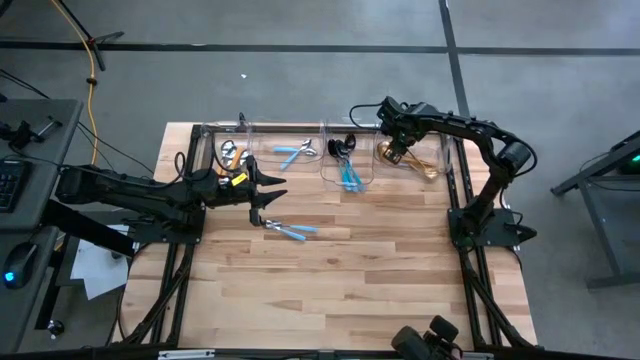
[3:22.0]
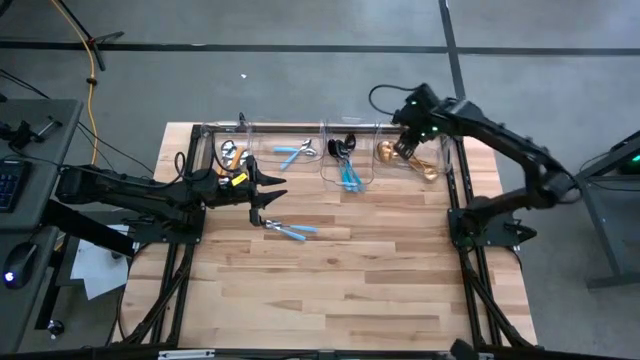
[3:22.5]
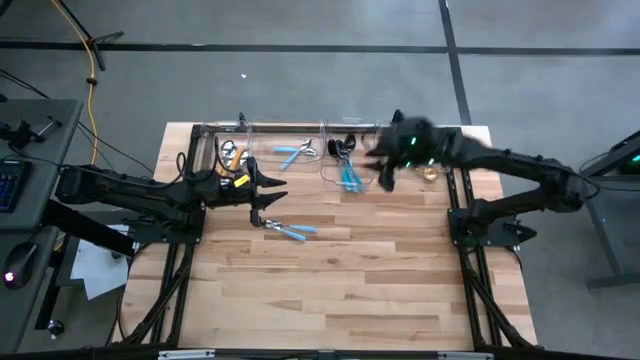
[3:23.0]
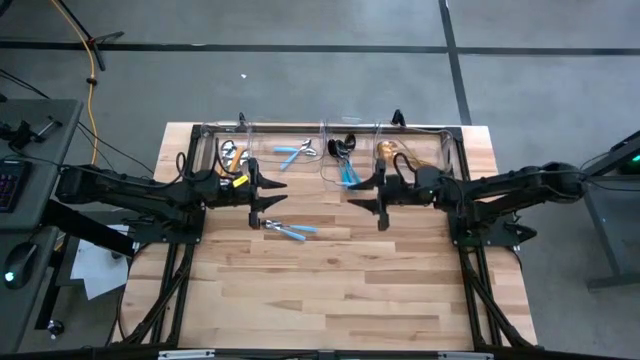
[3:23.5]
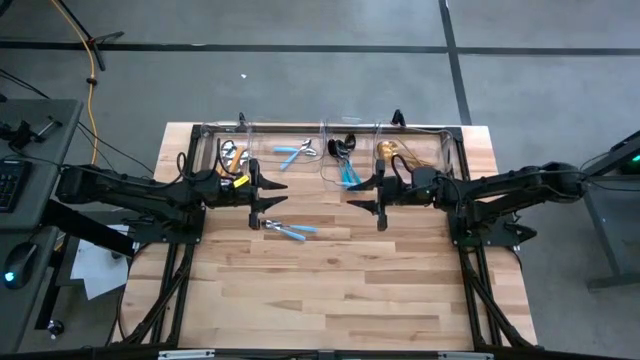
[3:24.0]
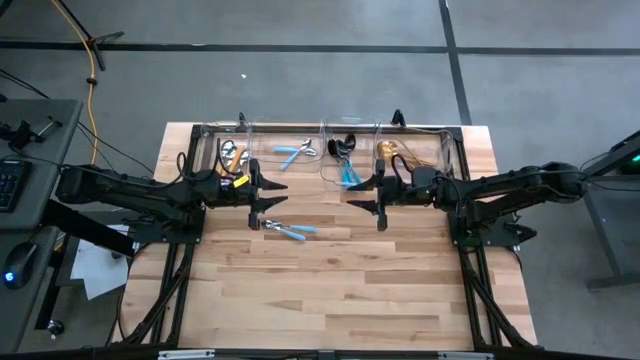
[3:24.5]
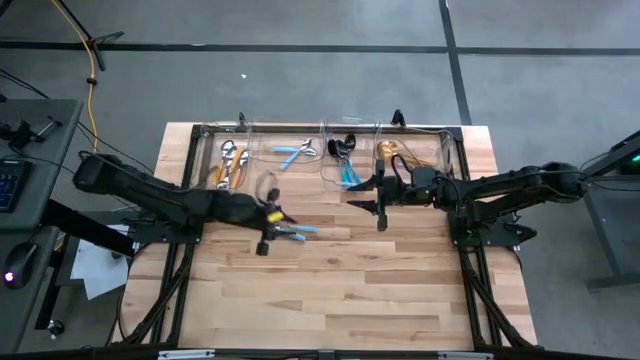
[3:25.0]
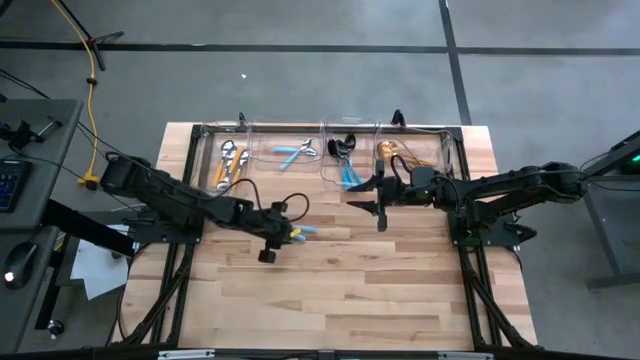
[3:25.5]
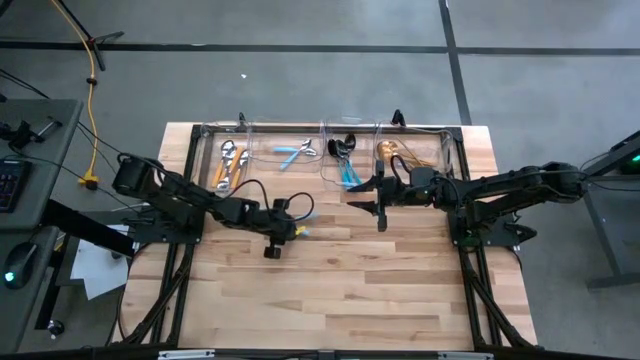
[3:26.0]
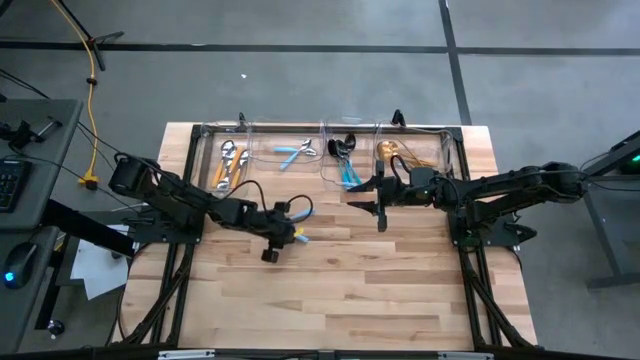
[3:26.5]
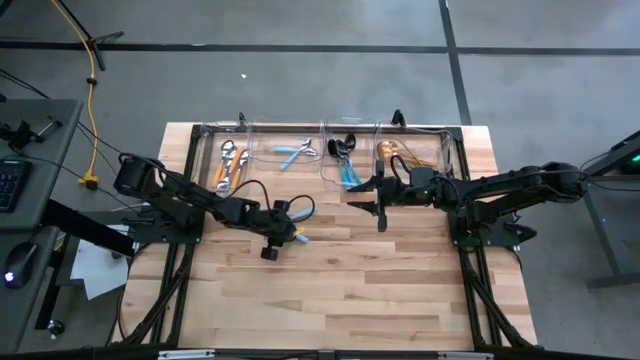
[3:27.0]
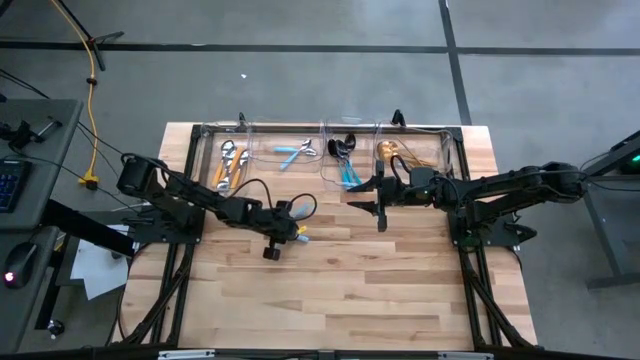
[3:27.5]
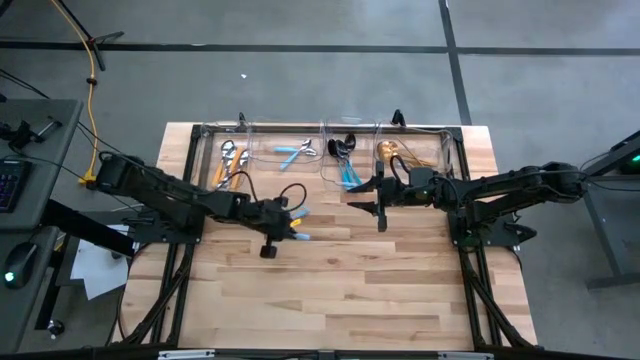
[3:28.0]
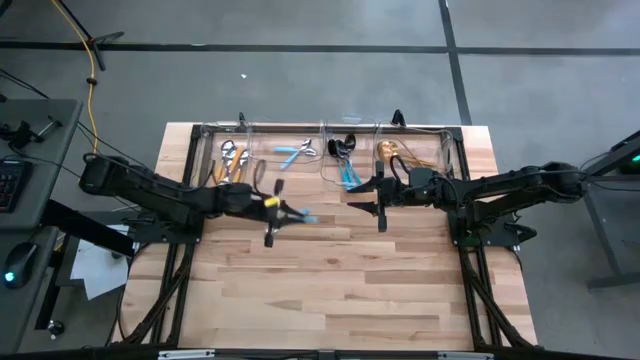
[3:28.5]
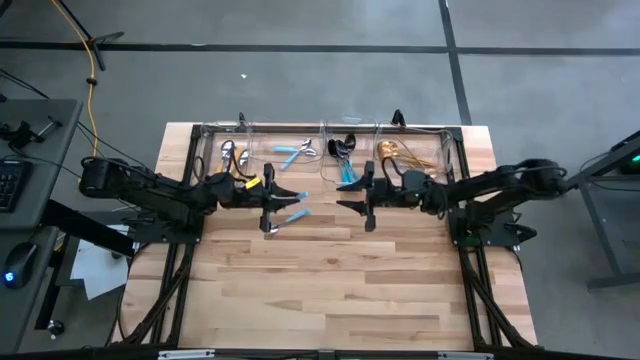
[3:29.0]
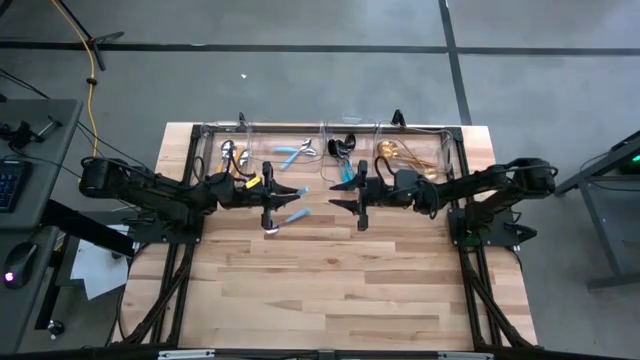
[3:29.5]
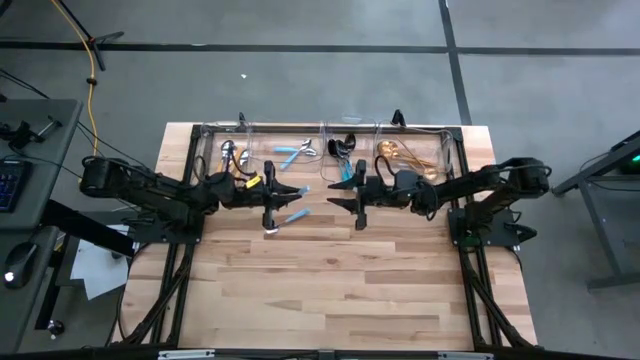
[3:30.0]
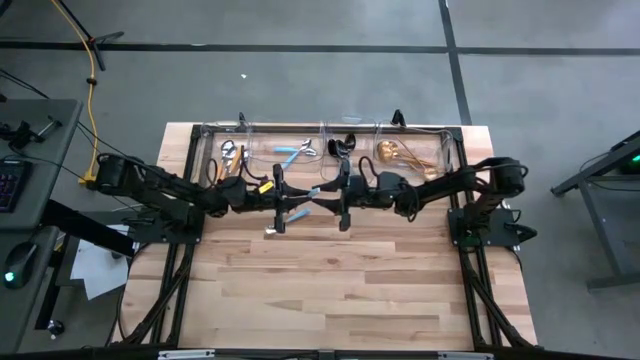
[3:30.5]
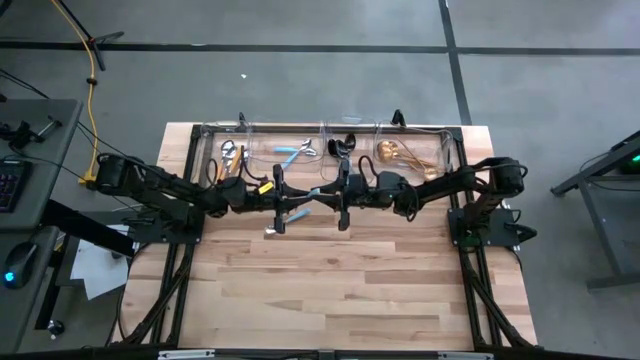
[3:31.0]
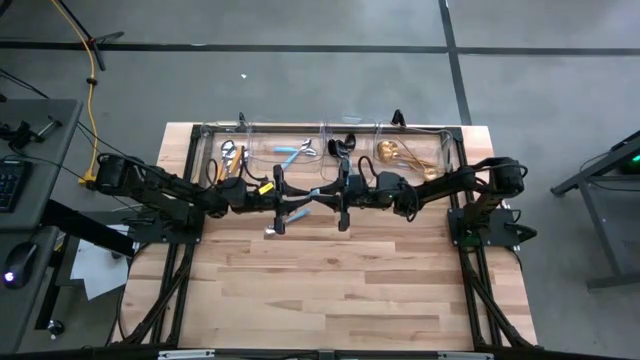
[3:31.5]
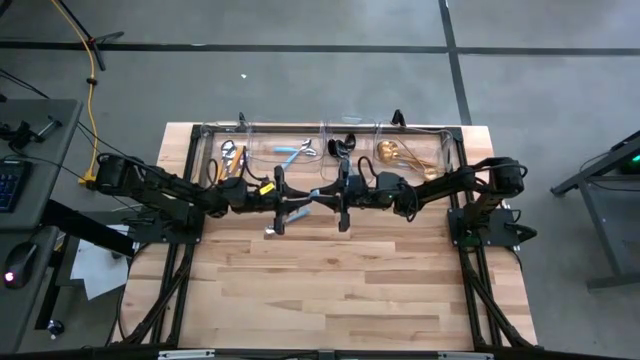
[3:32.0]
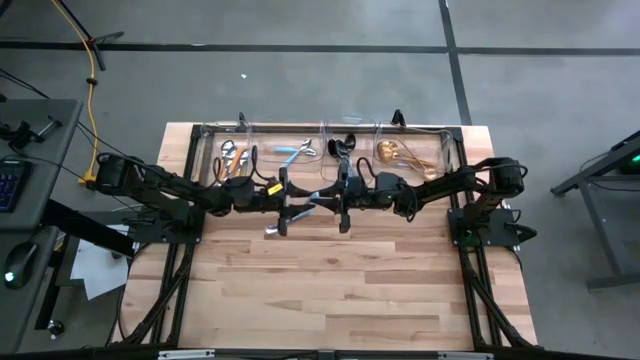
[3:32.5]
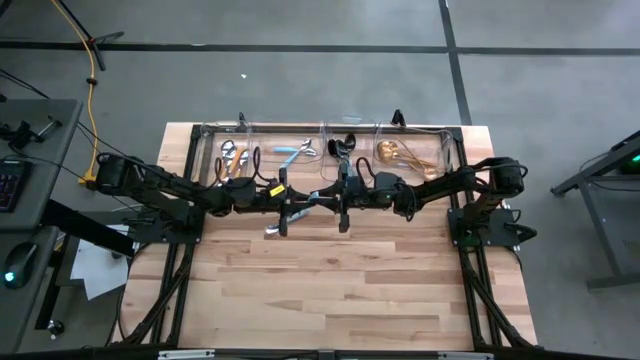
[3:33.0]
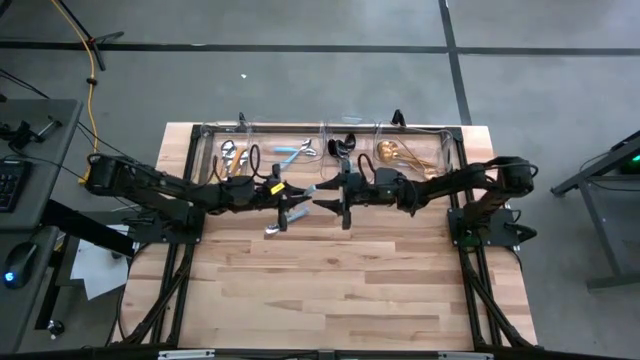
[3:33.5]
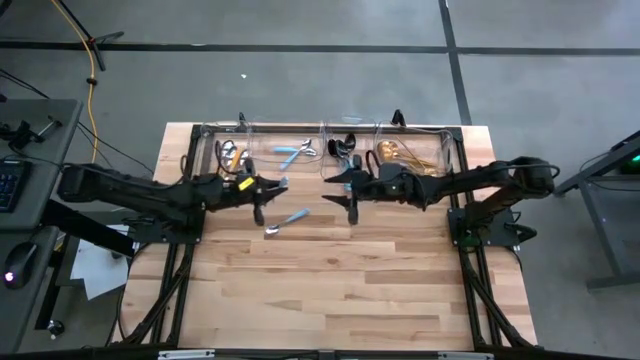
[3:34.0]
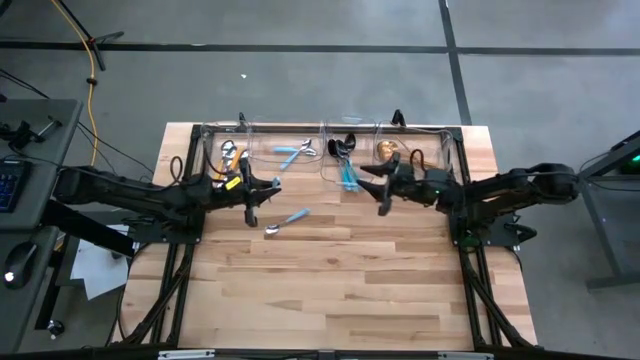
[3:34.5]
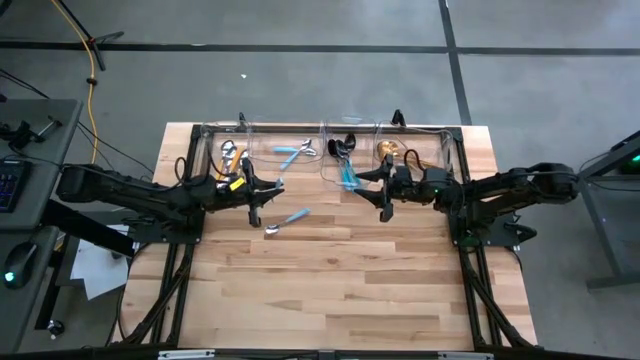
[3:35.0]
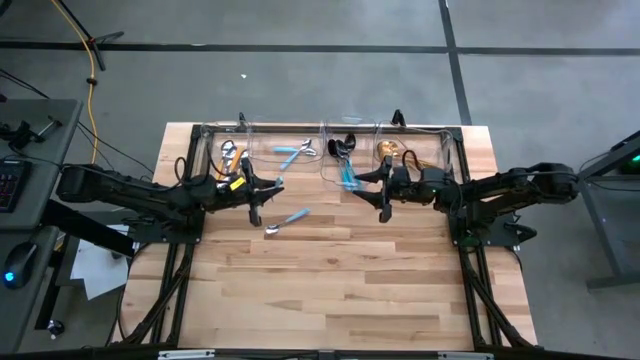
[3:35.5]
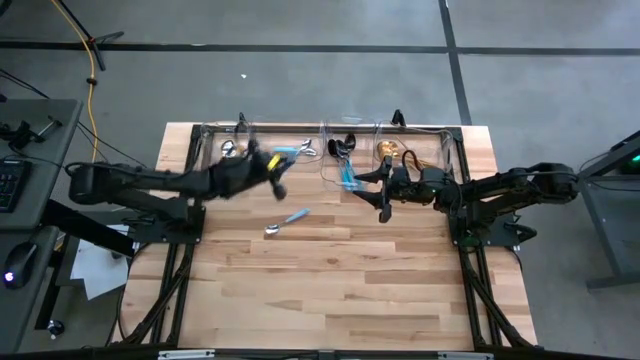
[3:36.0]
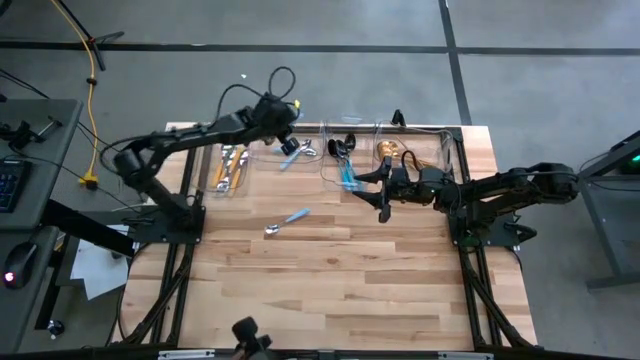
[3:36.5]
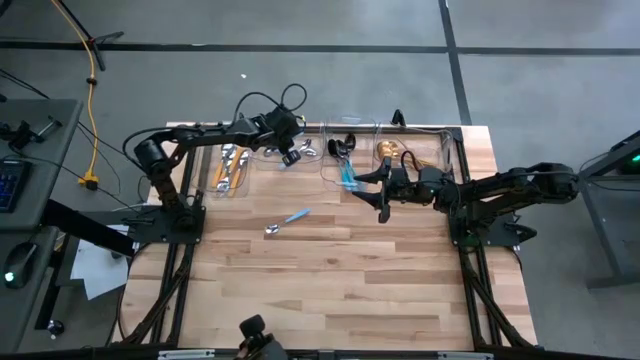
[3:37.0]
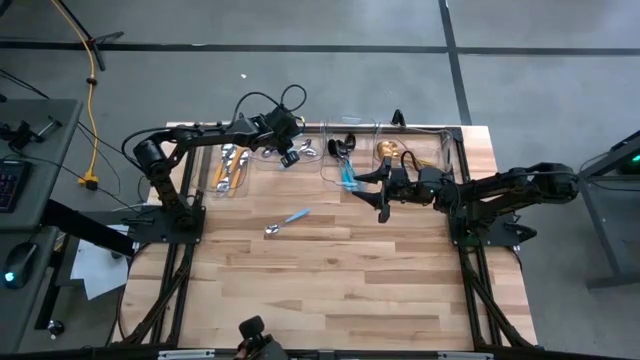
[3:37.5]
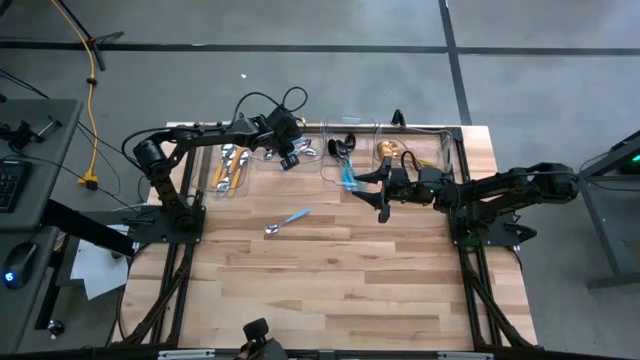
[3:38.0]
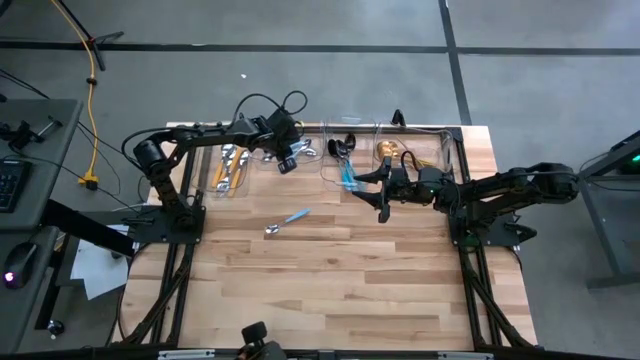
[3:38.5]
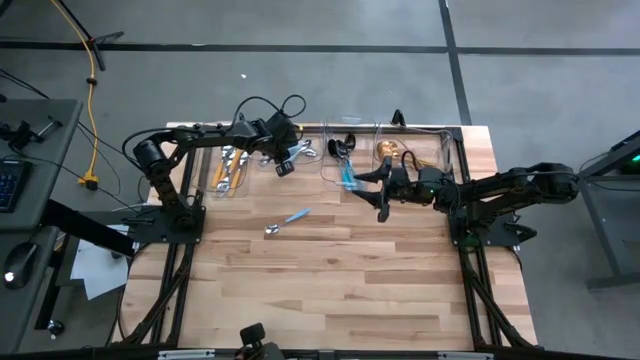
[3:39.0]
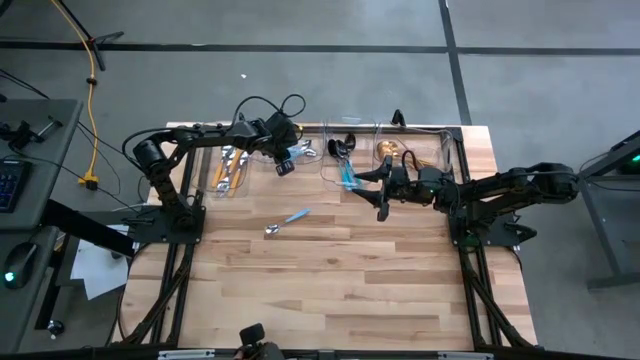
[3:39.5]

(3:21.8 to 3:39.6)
Task: Sort silverware by color (type)
Put the blue spoon into the left transparent bin

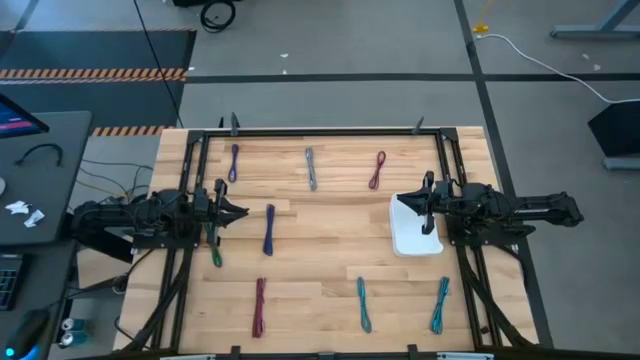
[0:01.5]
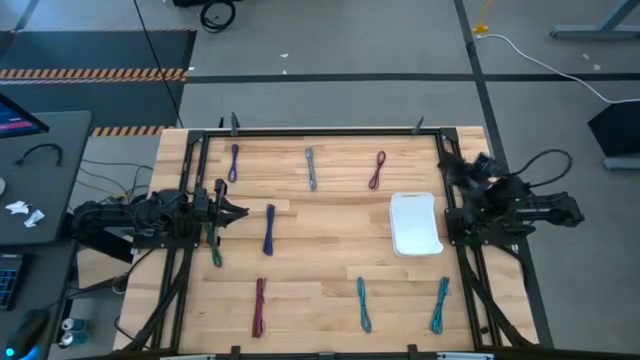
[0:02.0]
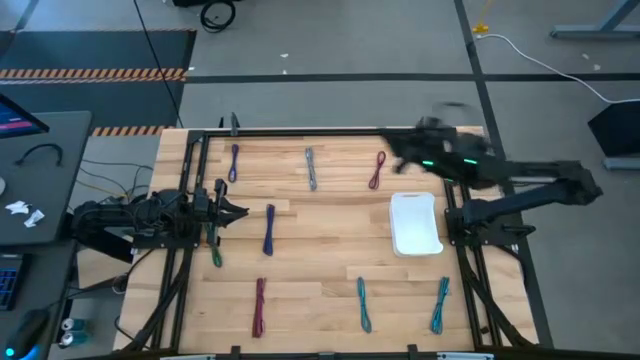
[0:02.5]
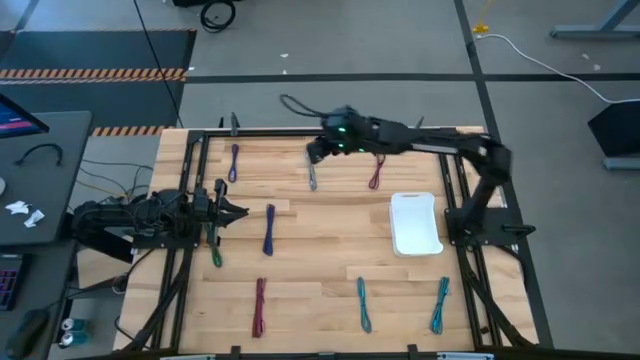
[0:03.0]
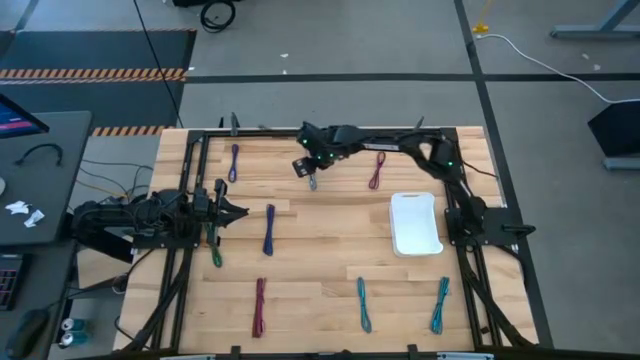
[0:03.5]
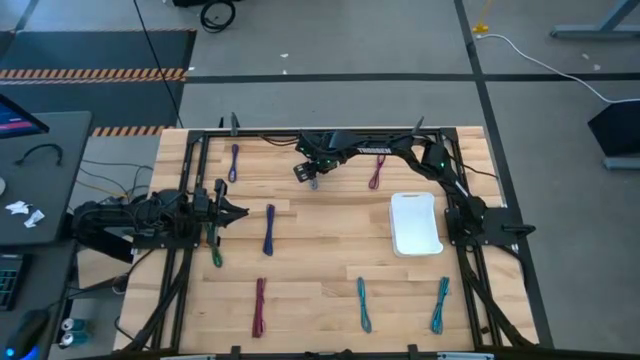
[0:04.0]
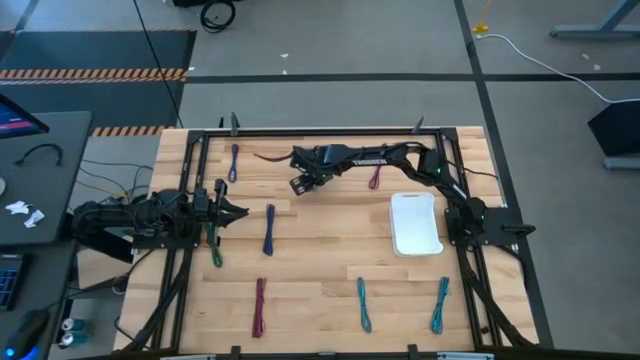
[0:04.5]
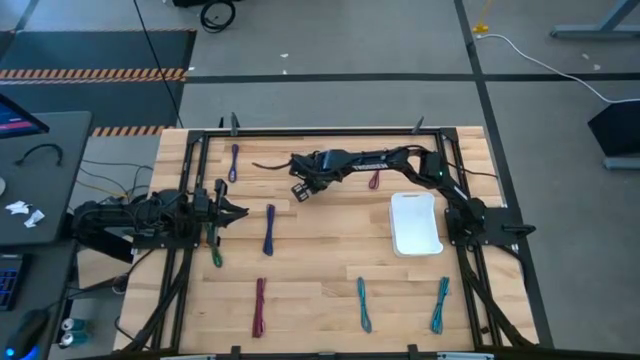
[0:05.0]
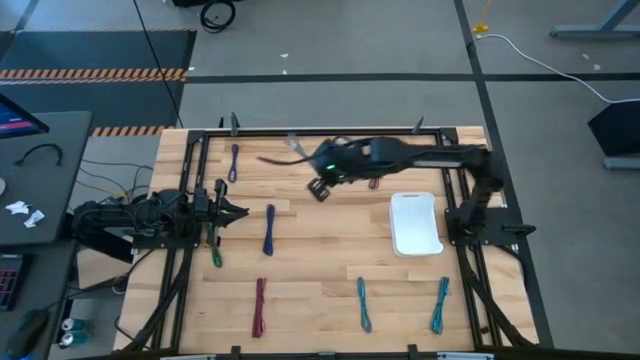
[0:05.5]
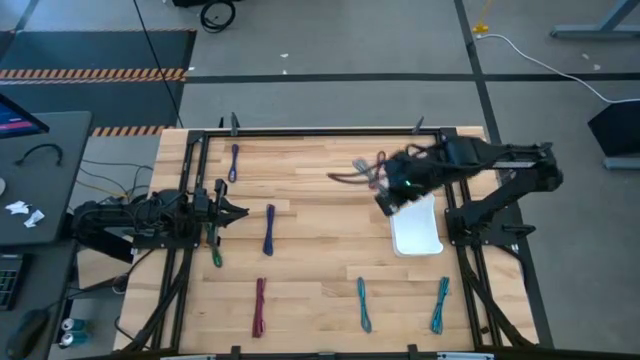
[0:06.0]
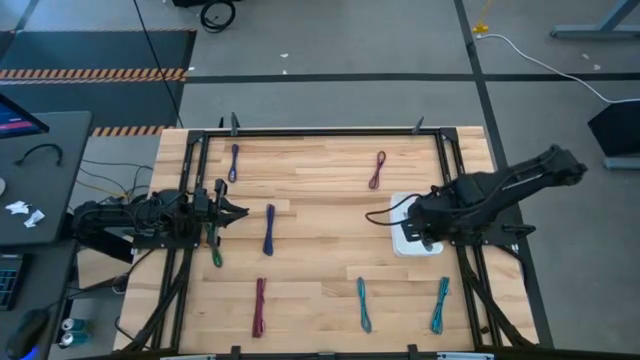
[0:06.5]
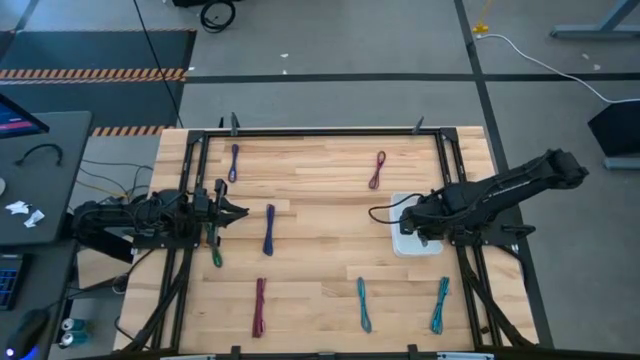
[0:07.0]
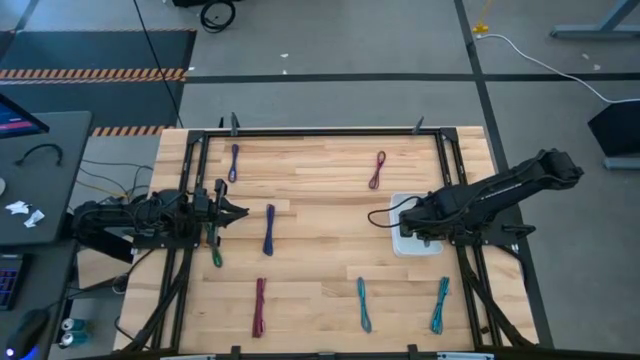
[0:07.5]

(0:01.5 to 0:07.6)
Task: Pick and place USB-C Cables
Put the black and white charging cable into the white bin
